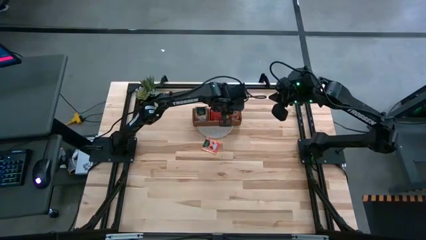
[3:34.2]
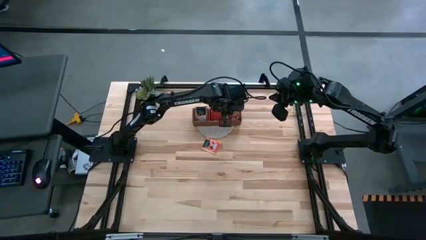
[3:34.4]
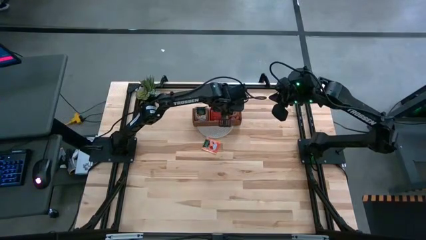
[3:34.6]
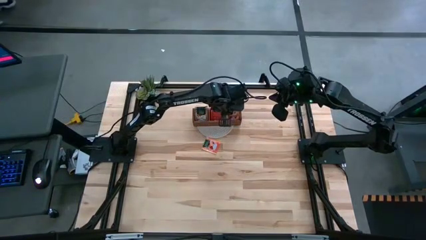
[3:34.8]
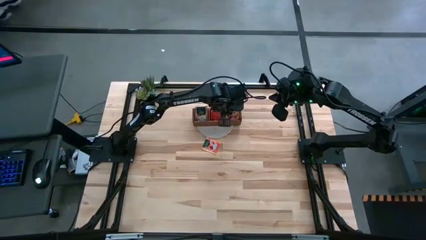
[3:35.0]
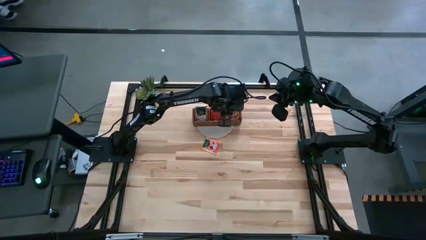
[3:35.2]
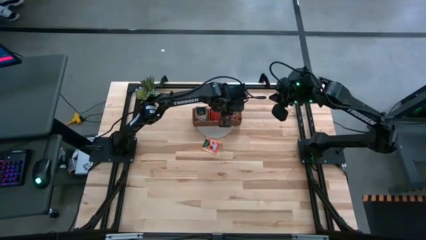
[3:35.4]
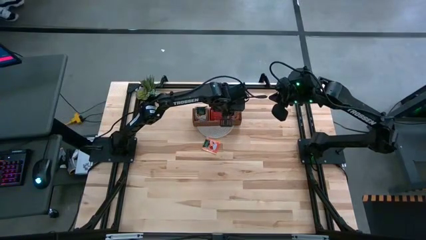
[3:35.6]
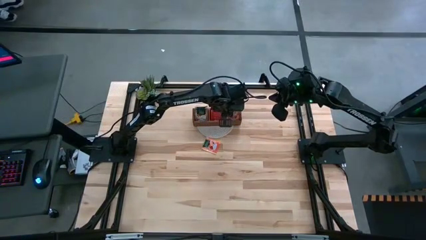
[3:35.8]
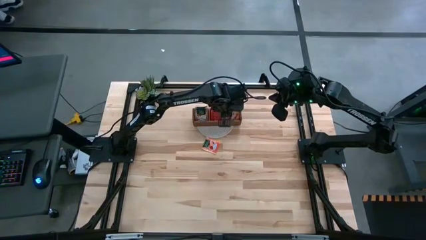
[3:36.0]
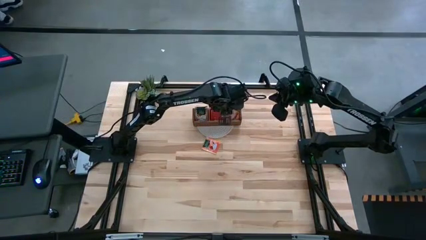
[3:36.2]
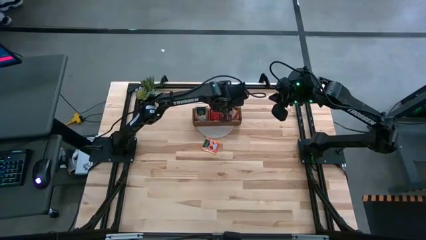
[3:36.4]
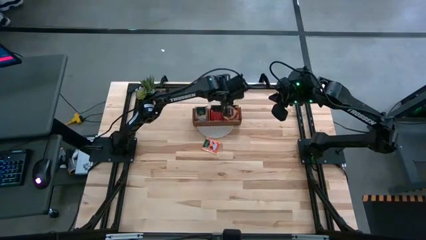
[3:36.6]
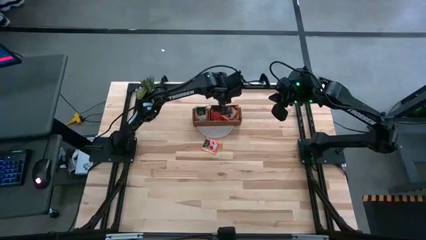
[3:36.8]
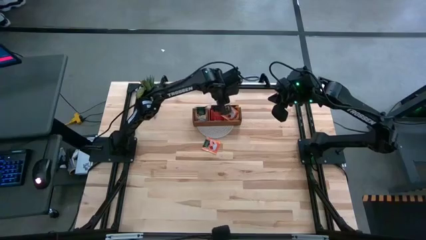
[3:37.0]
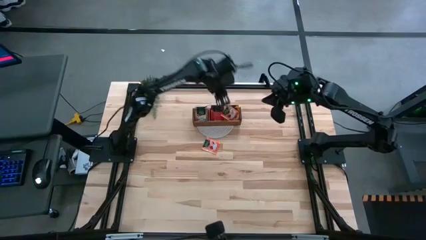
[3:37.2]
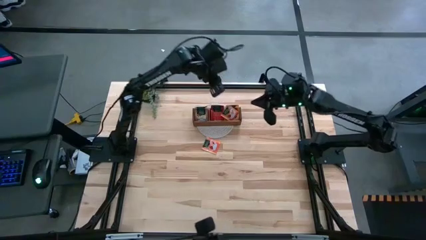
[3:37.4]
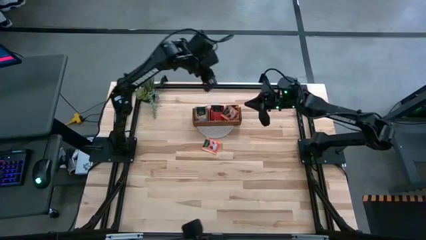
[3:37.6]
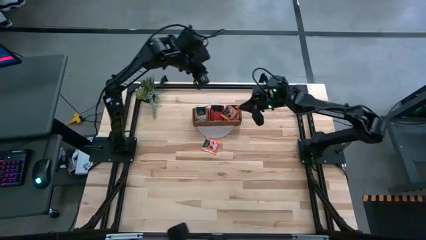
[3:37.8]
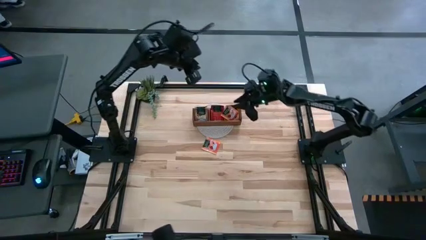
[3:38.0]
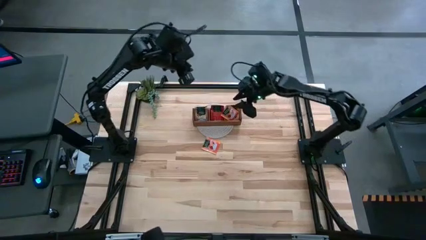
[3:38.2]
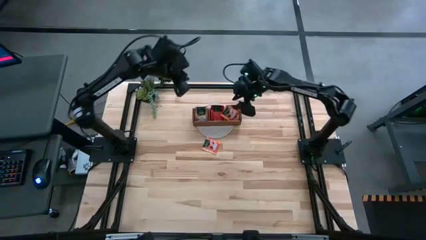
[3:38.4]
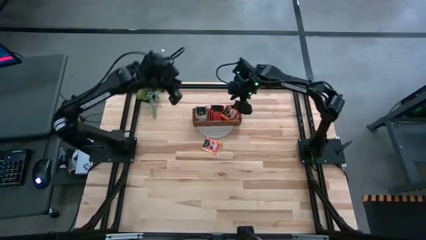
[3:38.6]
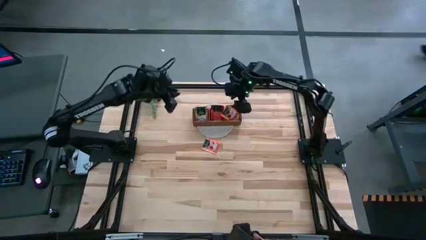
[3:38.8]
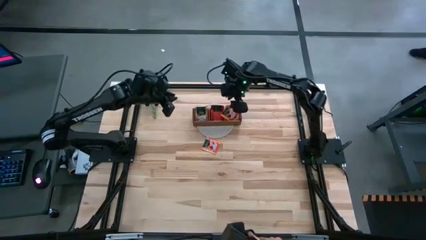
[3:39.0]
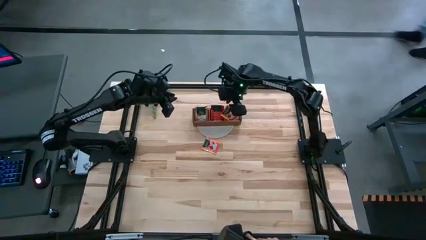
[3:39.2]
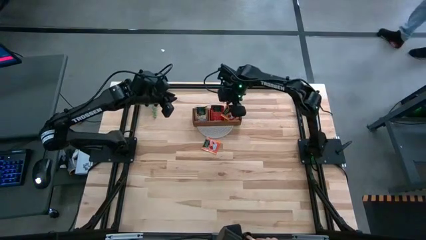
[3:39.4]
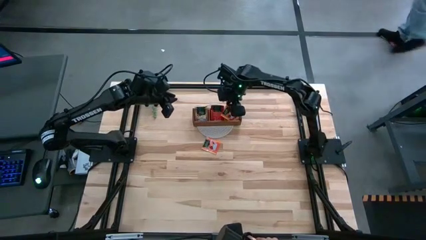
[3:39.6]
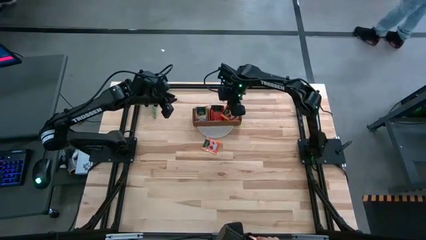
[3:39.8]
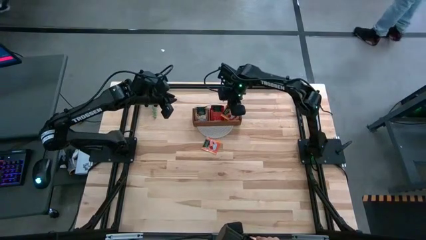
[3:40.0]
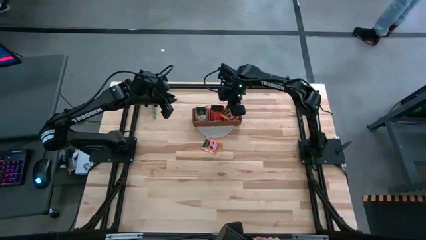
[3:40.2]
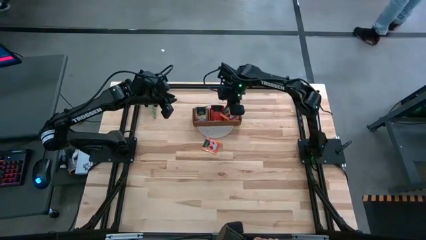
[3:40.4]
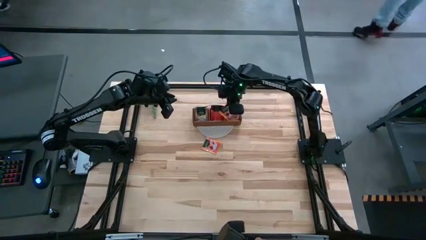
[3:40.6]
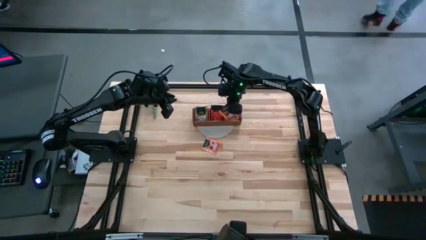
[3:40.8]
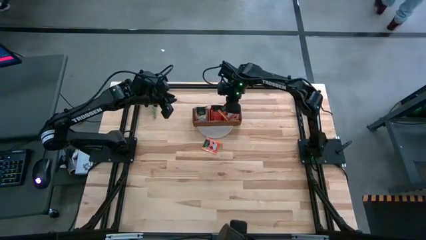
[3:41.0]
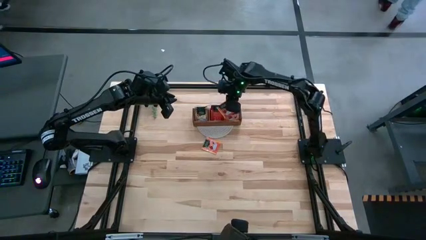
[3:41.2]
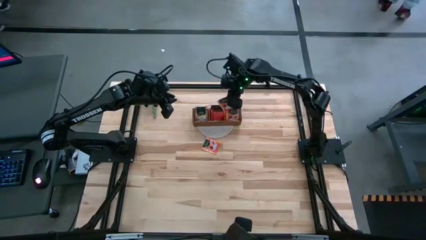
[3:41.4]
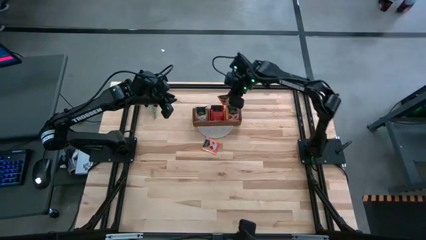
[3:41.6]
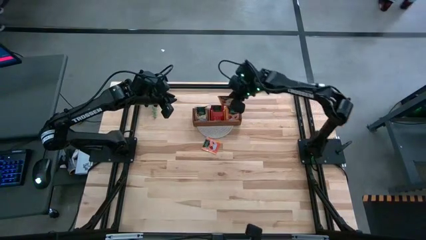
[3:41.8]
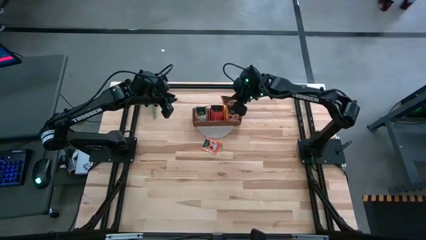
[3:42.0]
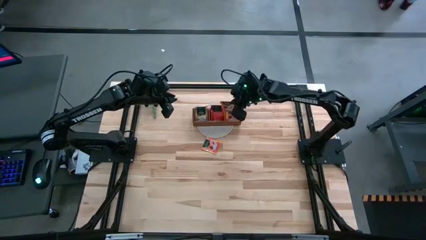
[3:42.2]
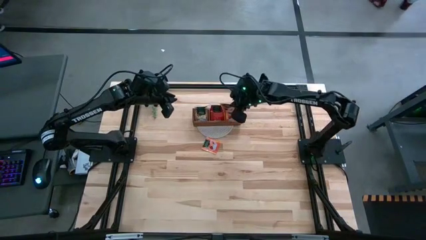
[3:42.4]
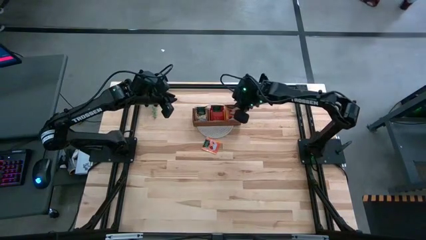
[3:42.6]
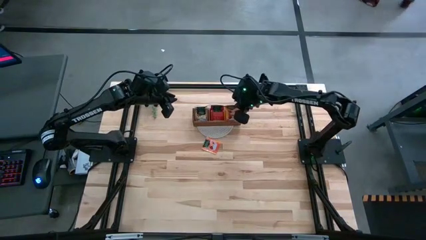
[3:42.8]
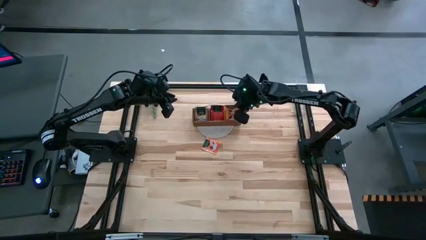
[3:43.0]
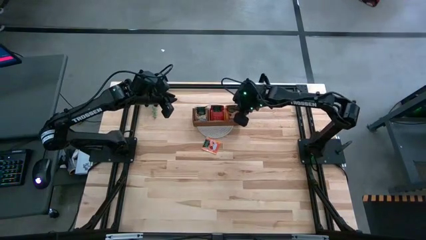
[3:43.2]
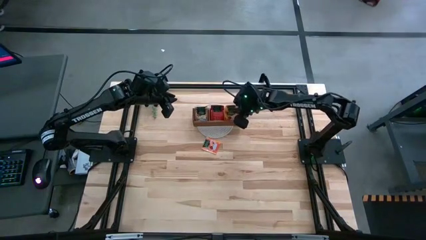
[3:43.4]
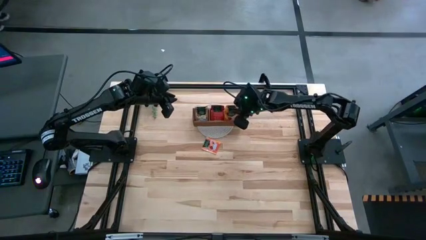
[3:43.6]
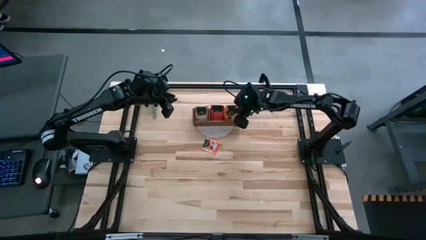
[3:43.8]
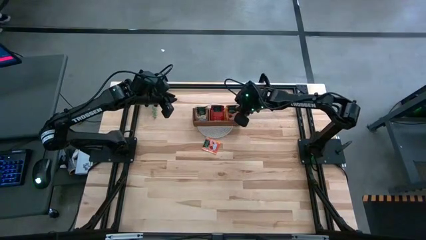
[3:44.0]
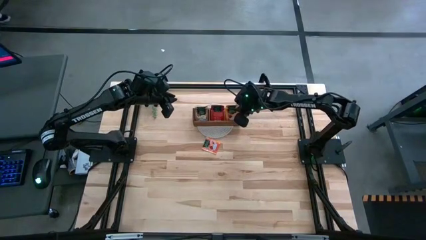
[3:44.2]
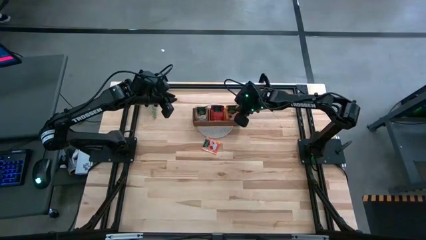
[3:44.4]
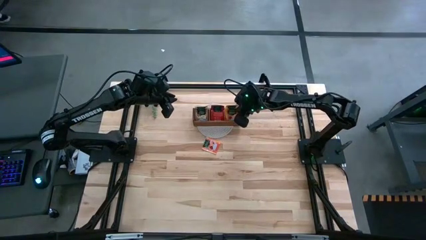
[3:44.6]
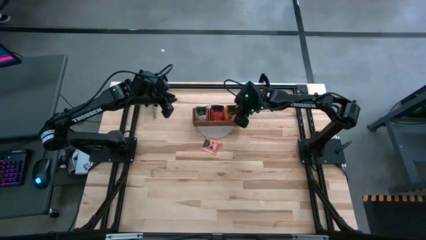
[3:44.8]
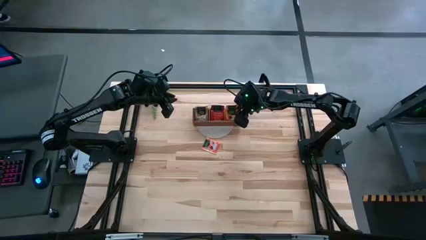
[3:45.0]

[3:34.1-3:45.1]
Task: Pick & Place Tea
Put the orange tea bag in the right section of the wooden organizer

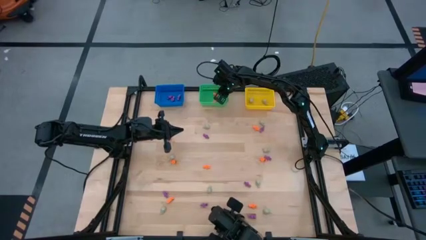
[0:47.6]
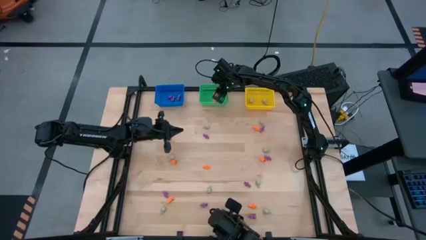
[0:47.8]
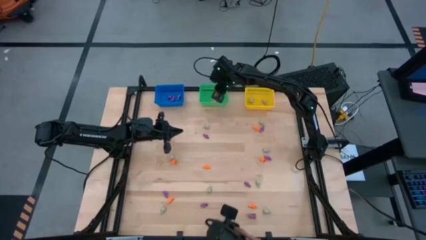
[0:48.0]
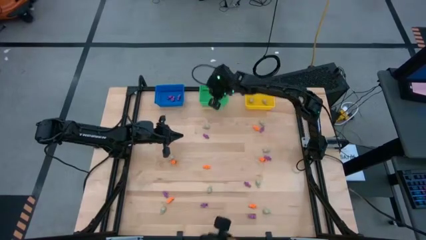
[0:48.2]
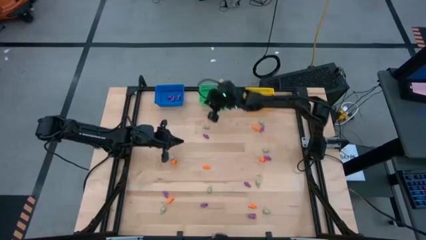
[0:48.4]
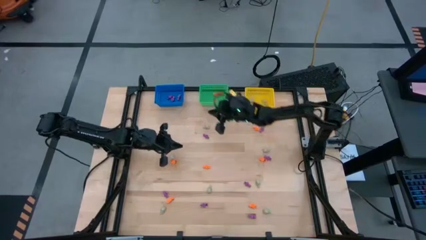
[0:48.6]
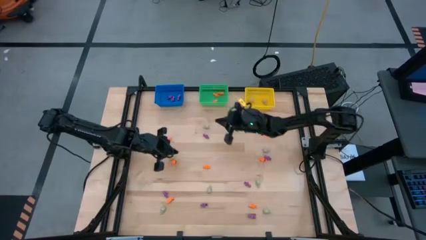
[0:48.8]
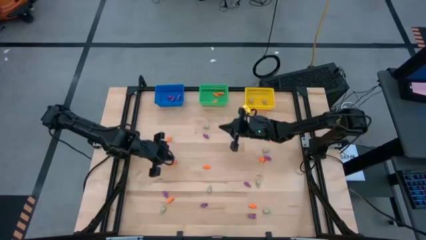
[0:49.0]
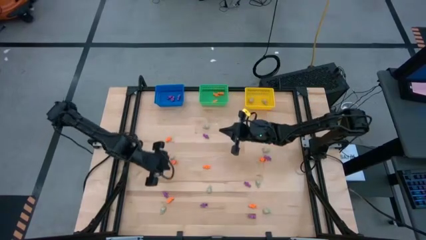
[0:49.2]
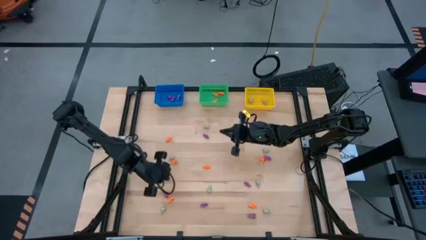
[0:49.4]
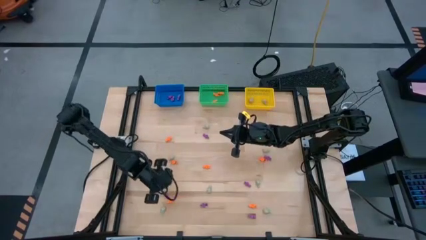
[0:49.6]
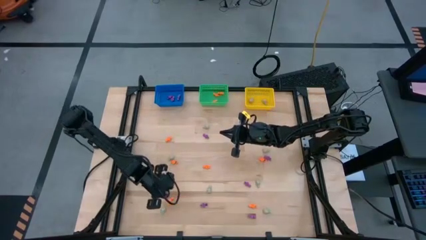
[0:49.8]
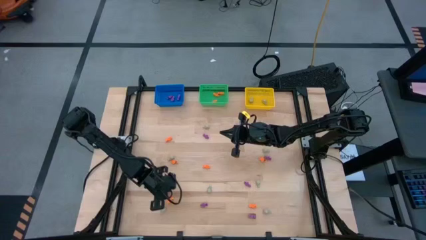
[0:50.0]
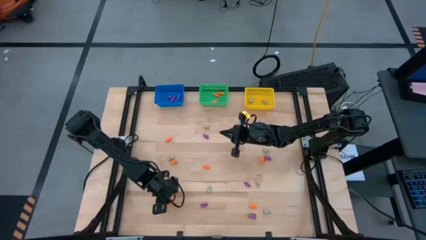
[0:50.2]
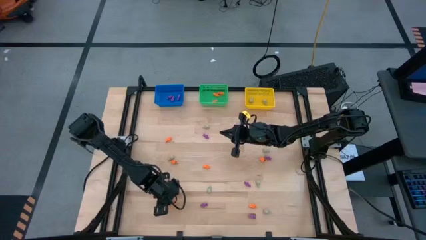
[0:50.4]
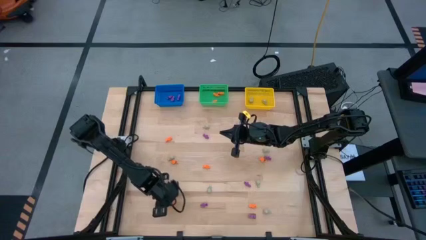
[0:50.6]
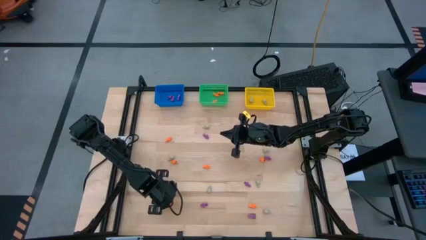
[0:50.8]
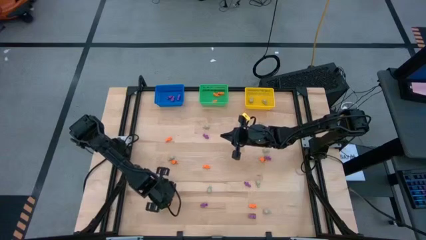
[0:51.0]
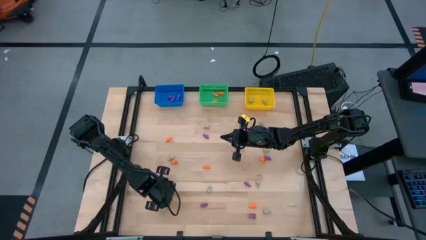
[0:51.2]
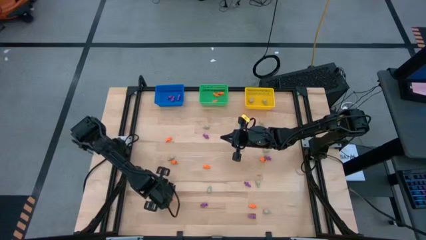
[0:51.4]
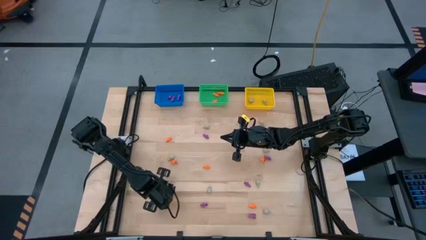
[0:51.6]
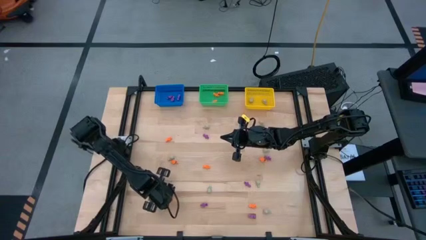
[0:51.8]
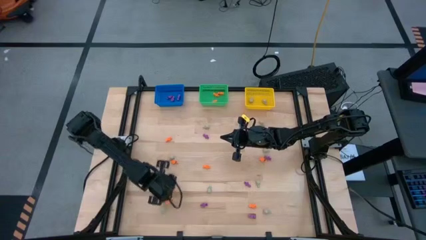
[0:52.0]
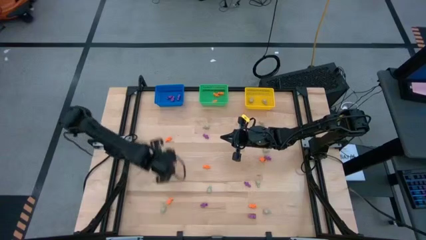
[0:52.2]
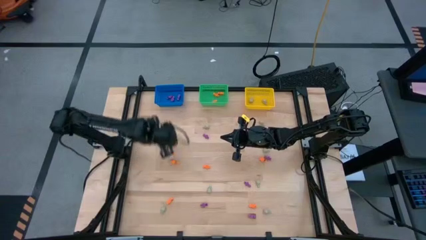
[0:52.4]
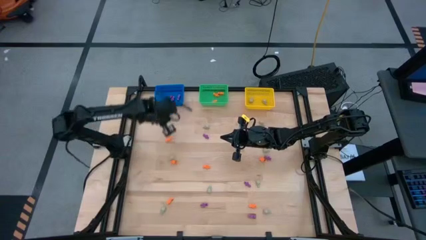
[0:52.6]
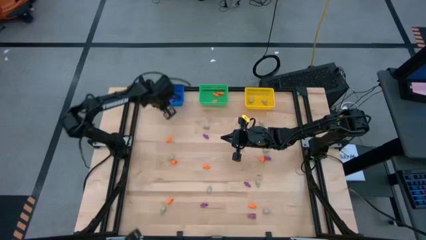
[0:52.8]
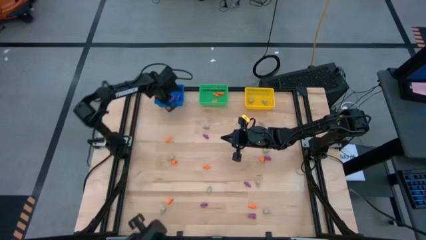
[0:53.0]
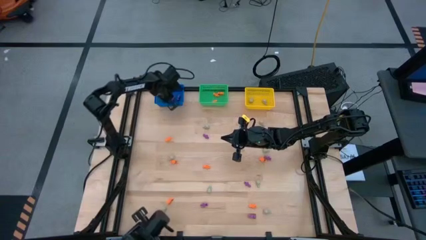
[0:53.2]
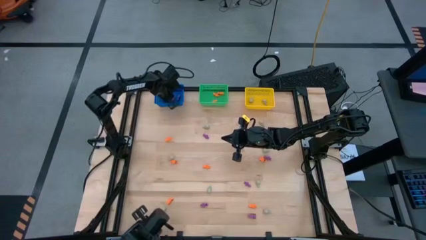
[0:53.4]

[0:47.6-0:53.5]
Task: Sort Halloween decoration
Put the purple skeleton toy into the blue basket
